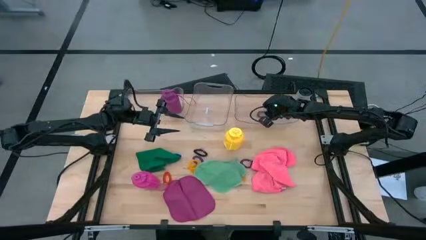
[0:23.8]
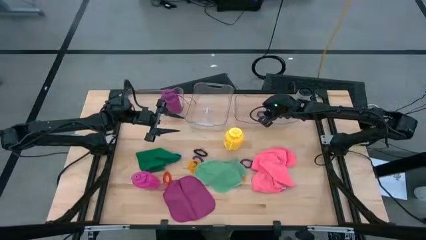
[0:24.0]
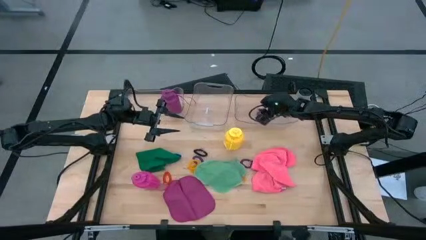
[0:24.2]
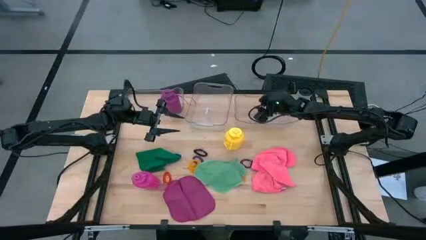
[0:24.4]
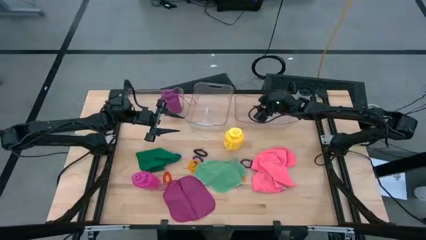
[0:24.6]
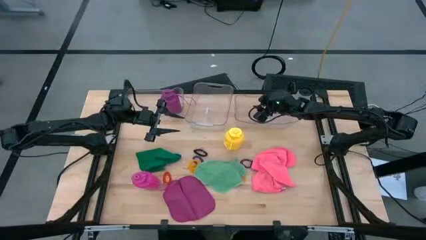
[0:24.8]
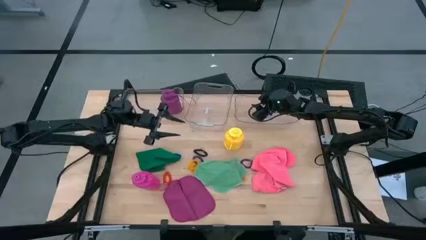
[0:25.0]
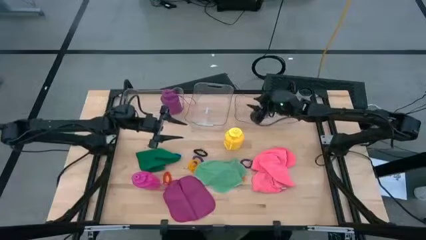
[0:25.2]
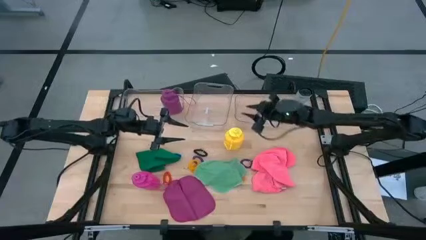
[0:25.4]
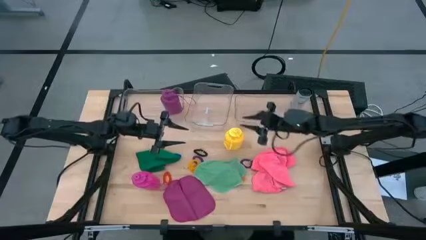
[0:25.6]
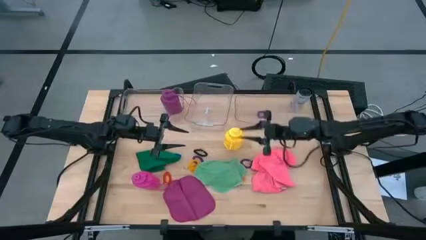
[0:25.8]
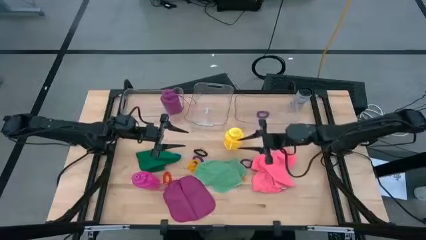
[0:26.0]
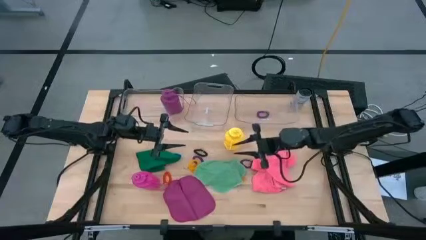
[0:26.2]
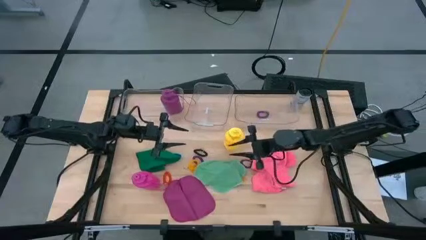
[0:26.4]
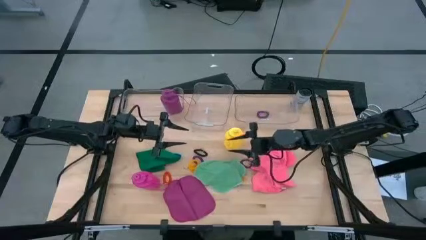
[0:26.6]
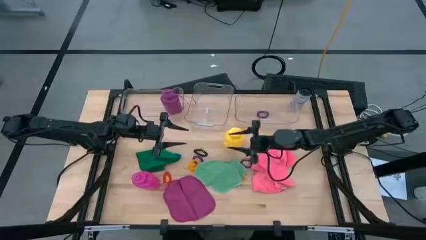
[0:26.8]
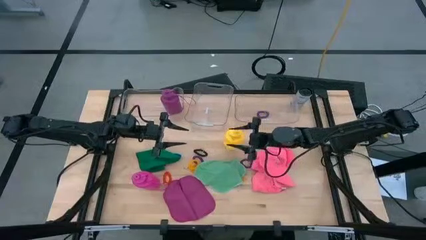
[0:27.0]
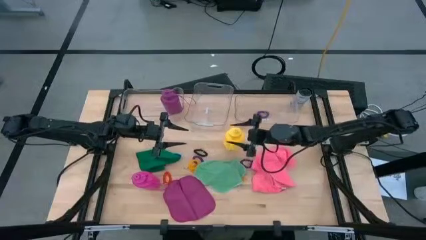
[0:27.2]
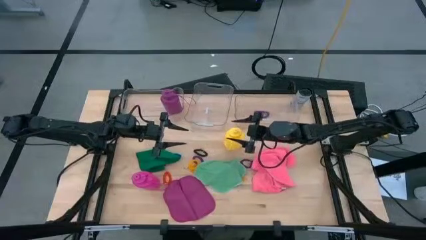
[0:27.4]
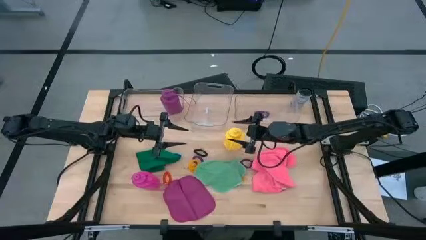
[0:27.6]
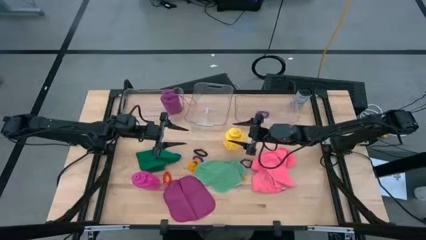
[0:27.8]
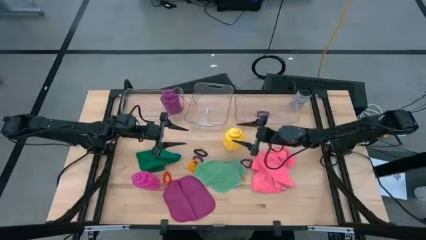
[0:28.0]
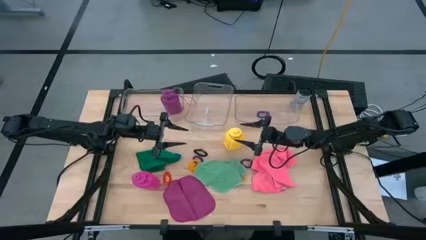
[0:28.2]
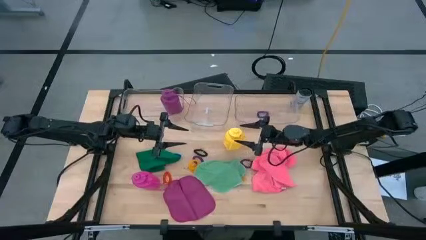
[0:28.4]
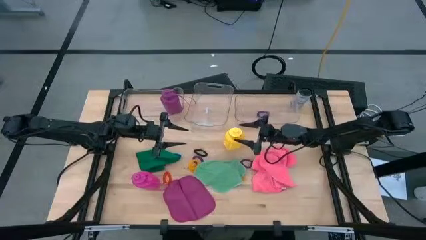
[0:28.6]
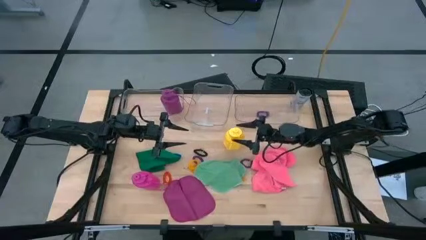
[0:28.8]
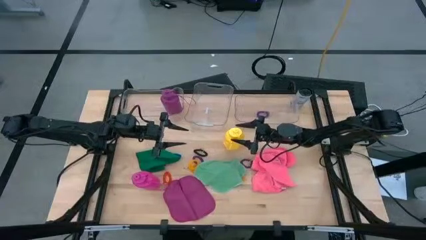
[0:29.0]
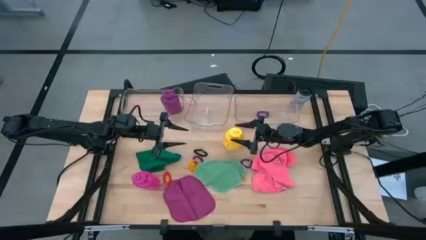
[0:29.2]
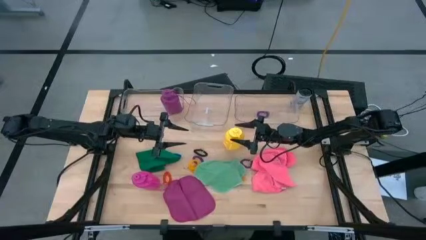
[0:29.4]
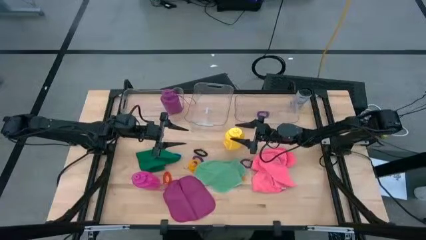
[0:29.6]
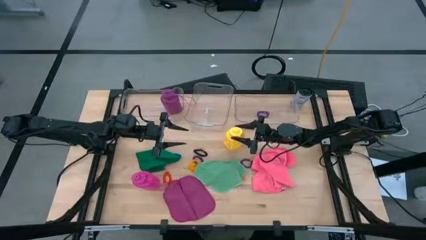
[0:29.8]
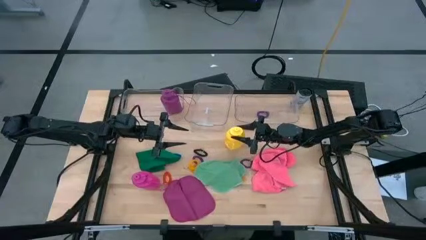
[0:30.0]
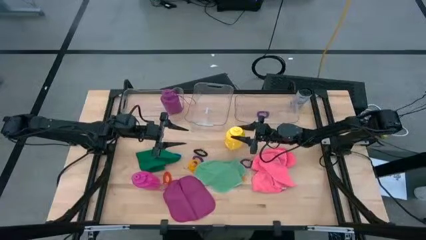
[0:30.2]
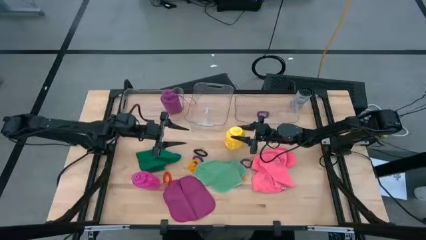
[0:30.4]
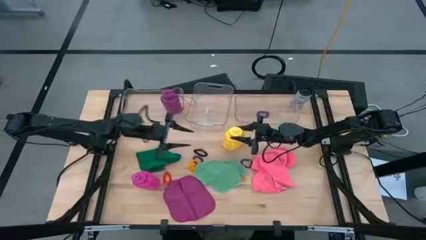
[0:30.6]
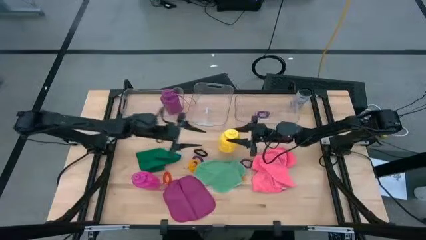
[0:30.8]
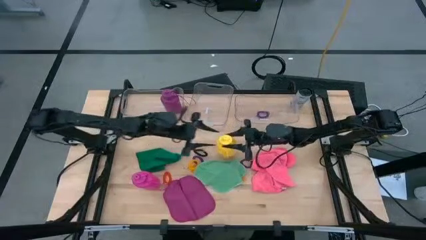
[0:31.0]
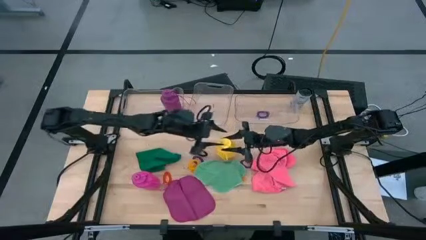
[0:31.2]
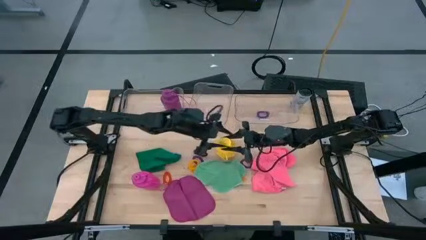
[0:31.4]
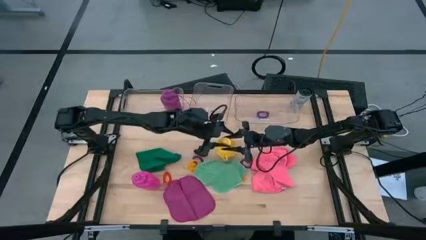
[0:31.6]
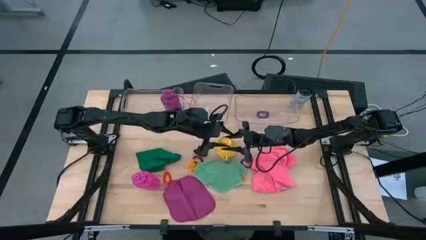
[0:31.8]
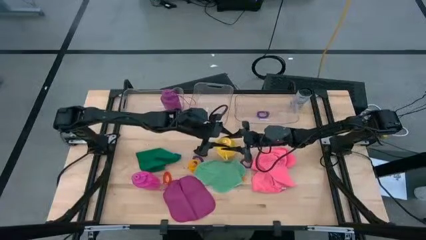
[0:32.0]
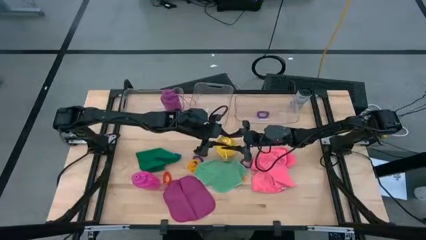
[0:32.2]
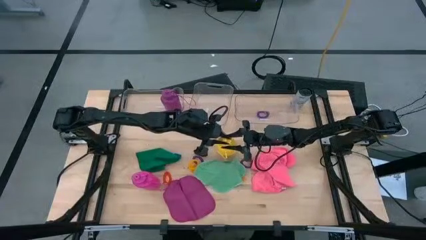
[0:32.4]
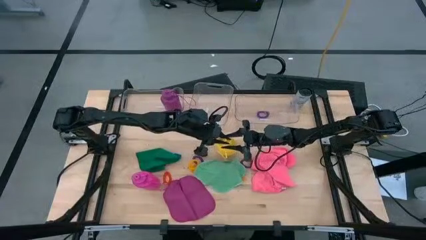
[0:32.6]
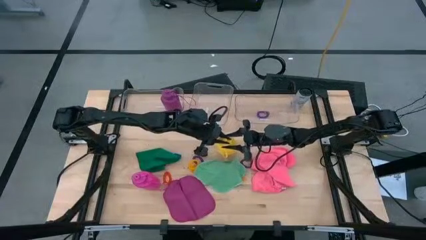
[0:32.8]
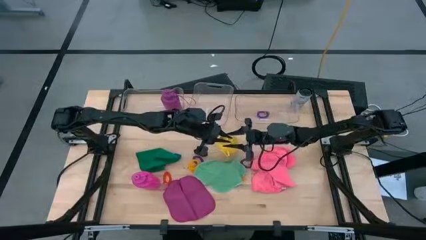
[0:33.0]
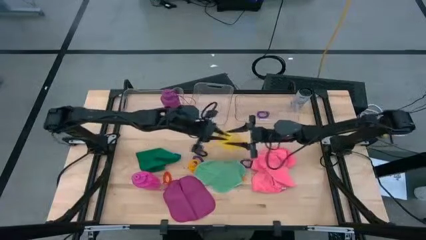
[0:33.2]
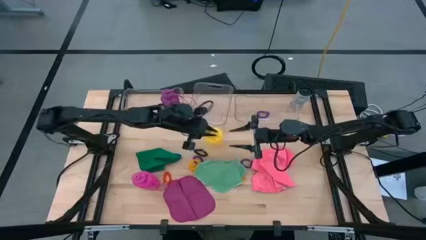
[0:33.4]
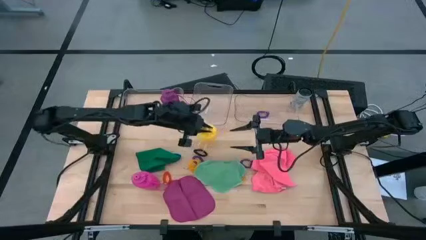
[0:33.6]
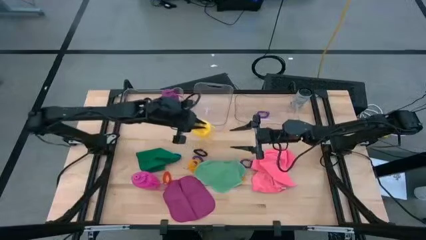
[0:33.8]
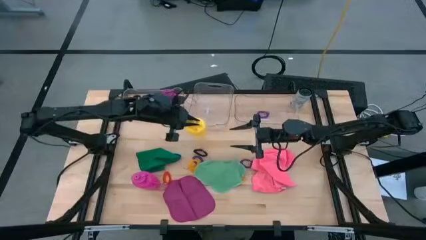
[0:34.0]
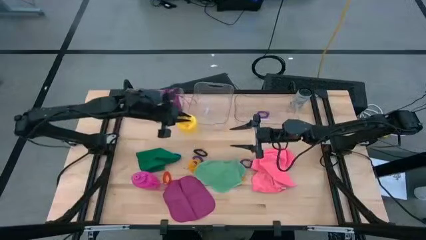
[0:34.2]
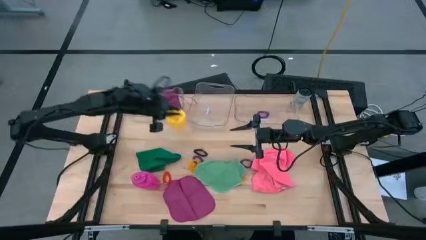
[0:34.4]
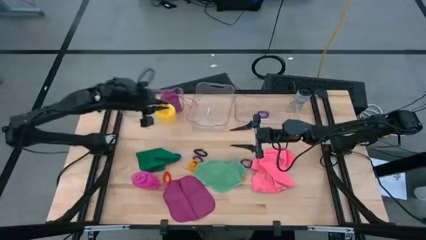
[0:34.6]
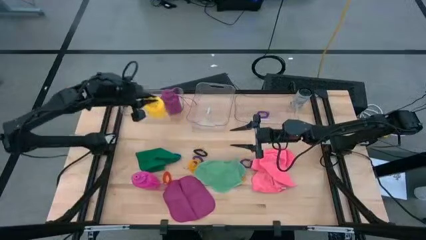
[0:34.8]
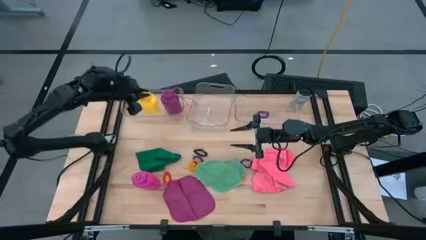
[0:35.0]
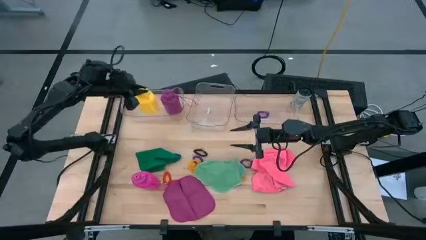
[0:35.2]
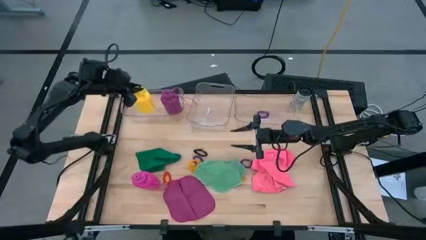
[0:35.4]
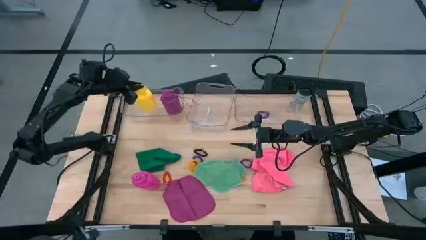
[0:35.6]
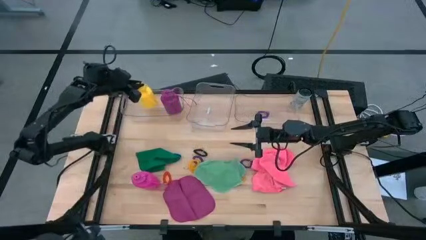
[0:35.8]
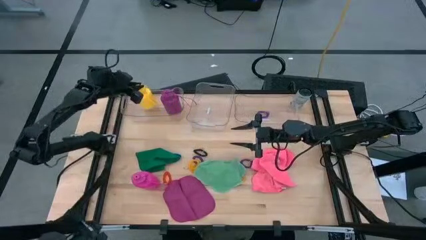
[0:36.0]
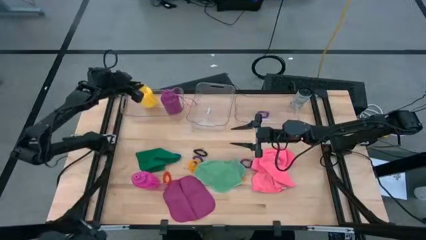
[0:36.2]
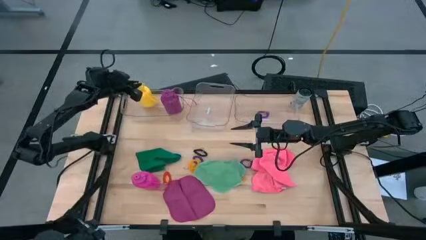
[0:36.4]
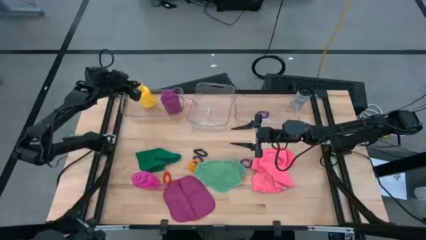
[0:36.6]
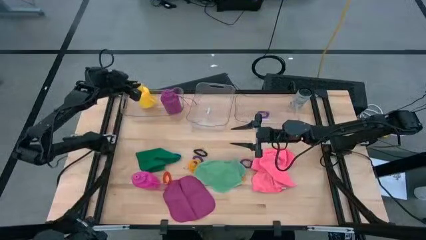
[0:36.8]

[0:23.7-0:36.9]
Task: Pick & Place Sports Items
Put the yellow water bottle into the left transparent bin
